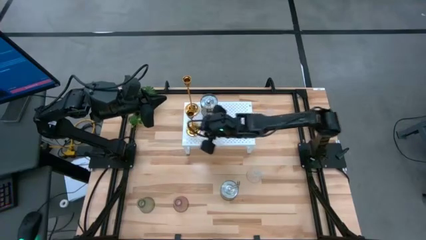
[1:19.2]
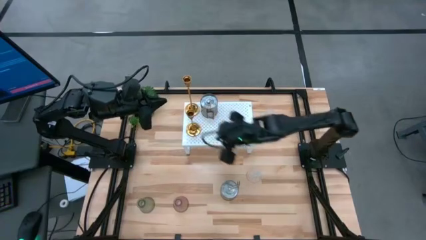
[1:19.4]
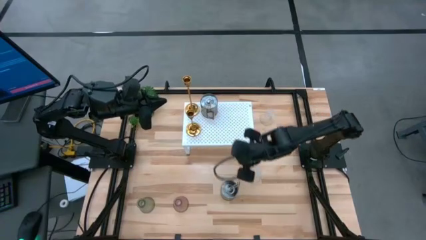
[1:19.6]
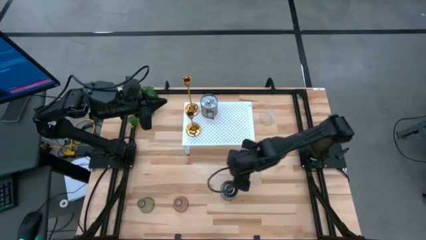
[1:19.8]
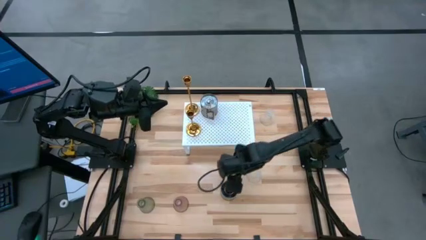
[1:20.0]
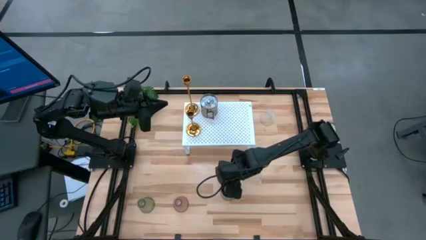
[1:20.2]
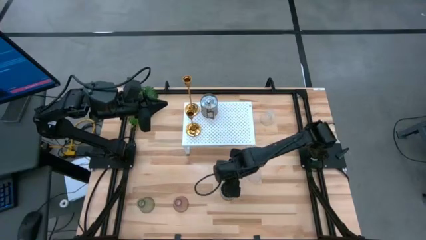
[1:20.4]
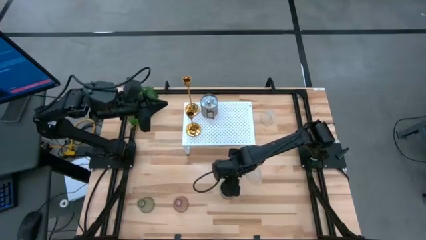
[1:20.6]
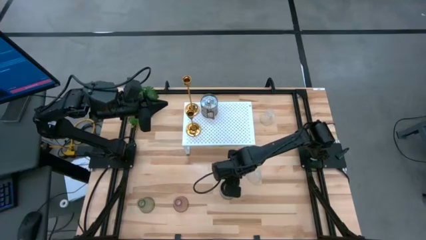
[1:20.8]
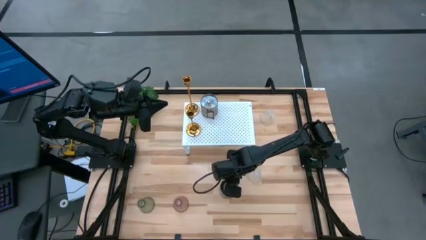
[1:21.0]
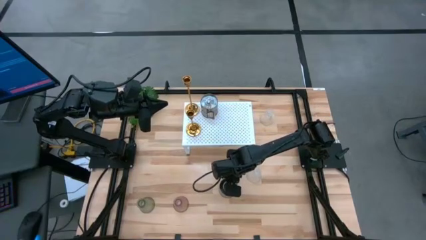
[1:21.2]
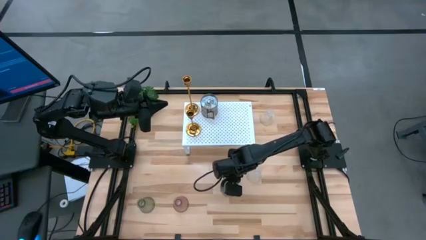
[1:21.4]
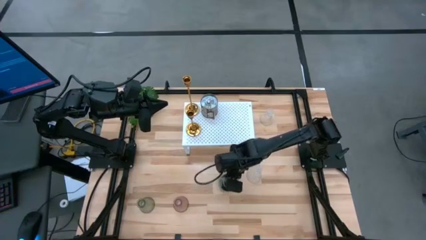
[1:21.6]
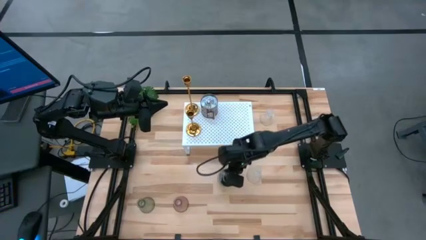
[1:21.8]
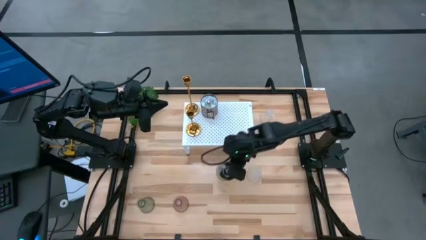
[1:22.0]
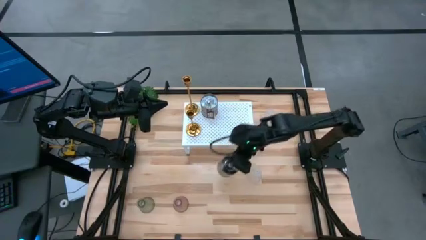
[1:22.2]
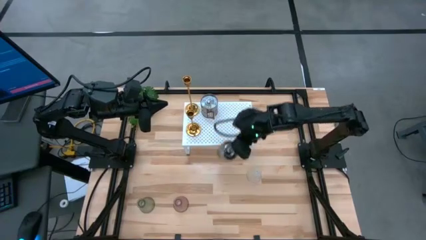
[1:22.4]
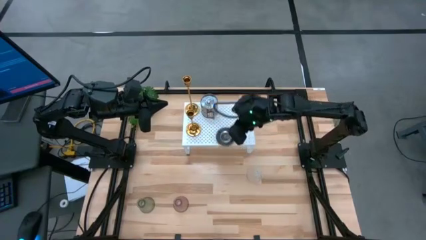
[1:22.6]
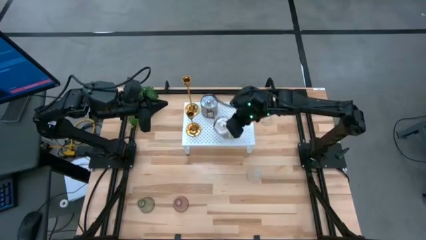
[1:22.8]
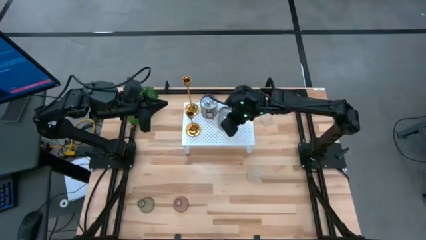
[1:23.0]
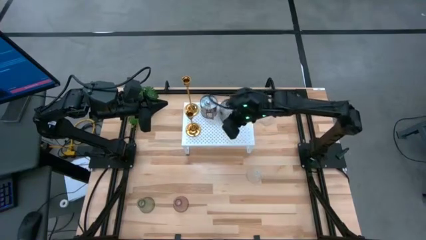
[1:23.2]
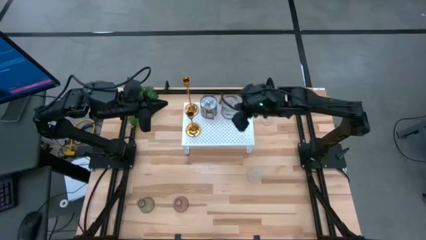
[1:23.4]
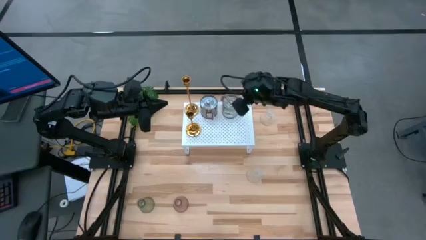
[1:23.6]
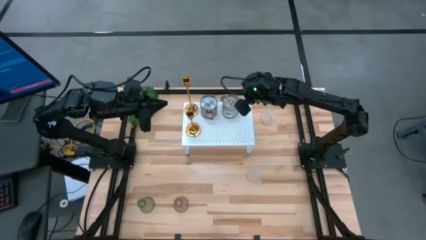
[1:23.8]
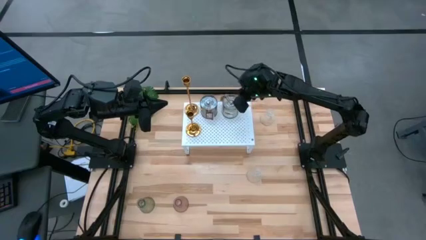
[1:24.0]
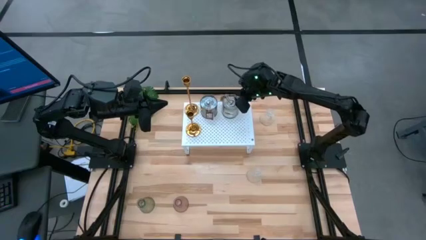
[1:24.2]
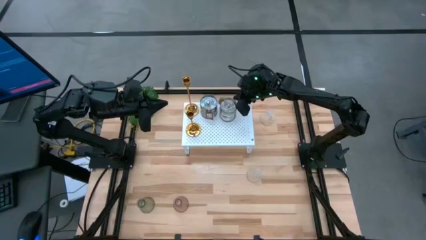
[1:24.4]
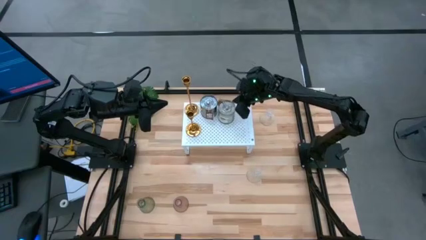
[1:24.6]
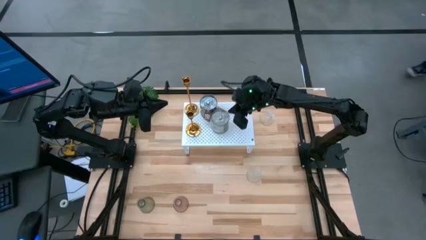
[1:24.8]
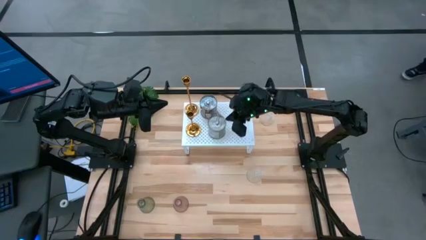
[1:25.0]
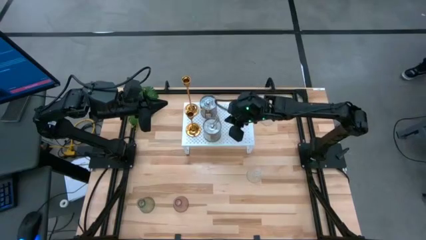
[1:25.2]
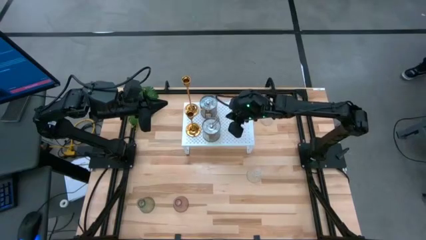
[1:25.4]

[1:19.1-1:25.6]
Task: Pick & Place candle stick holders
Put the silver scented candle on the shelf

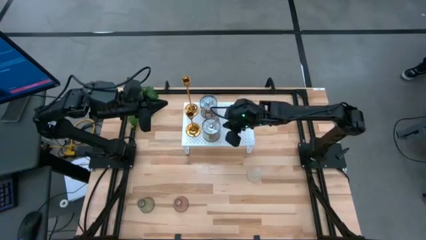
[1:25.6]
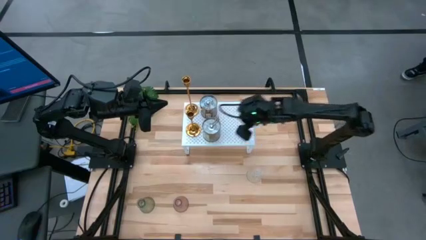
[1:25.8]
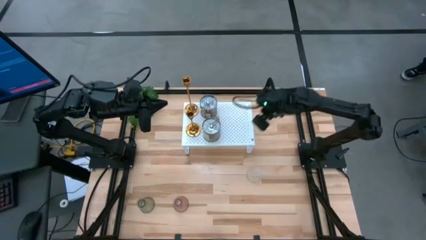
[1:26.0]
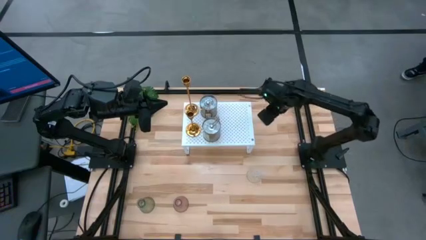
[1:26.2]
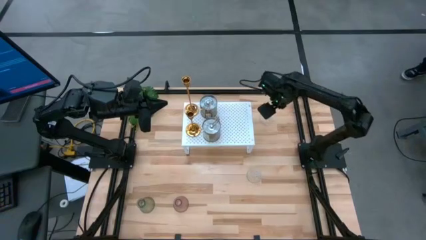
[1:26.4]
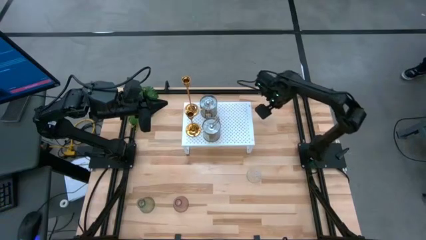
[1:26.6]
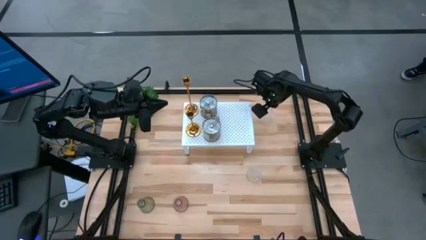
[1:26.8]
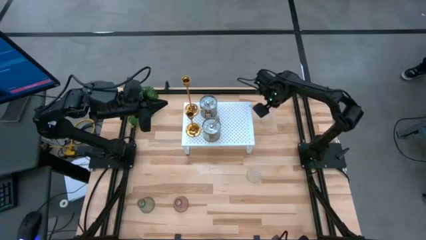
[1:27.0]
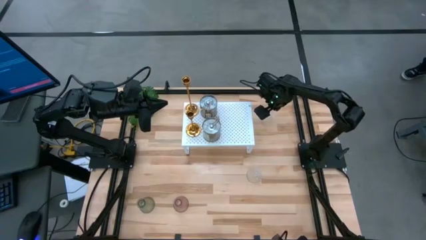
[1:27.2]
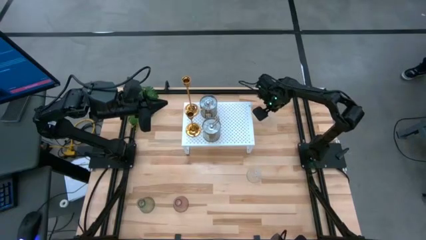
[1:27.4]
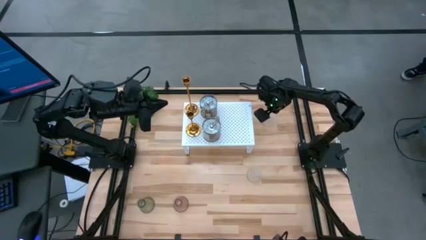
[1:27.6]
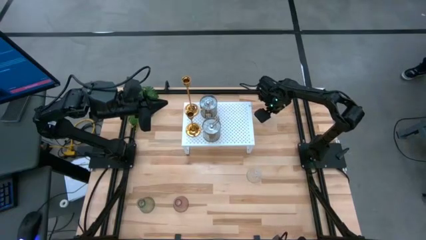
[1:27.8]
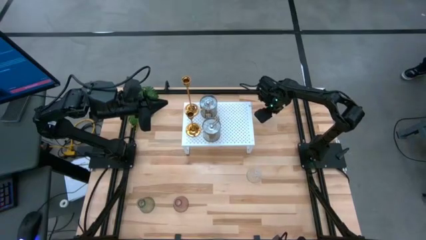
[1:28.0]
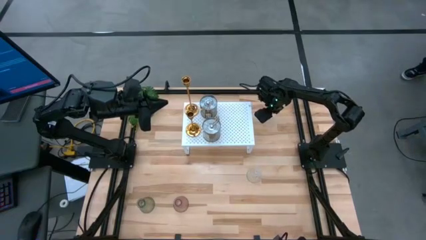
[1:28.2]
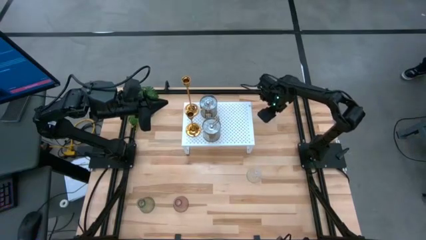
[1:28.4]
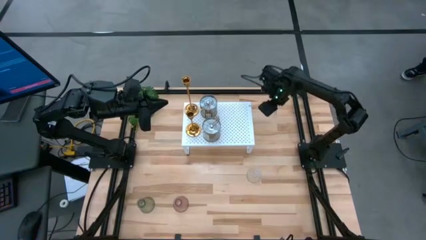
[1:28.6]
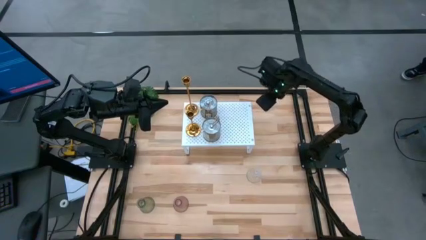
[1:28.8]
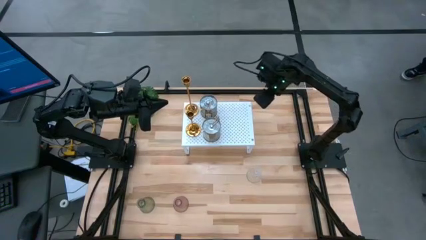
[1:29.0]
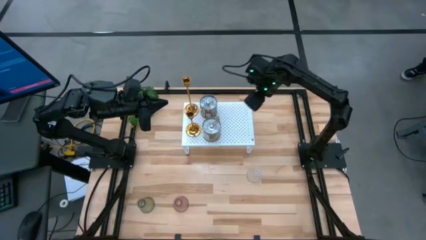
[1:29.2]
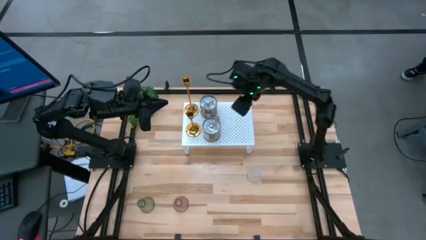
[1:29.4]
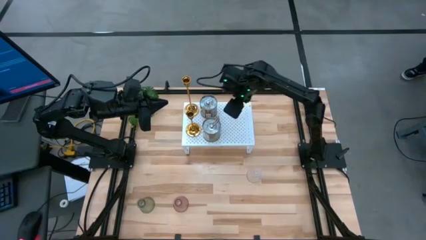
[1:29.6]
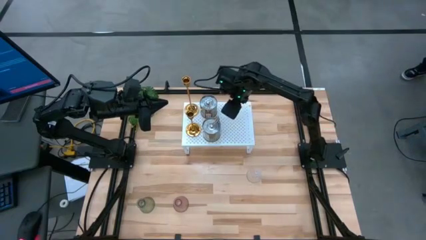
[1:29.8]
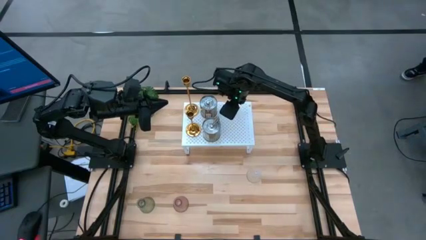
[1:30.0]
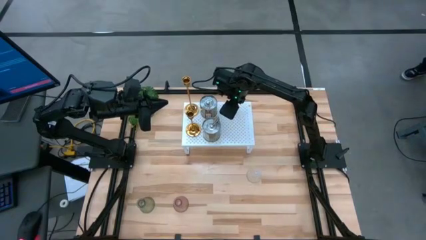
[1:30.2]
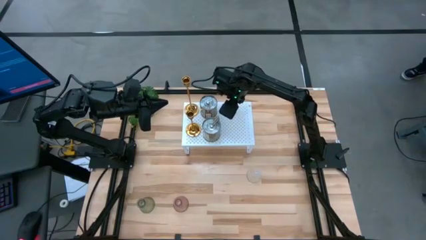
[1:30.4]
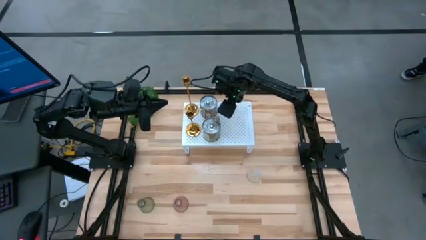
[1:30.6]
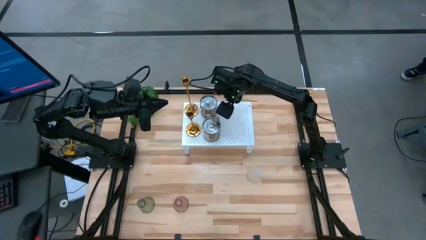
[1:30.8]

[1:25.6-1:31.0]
Put the top transparent glass candle holder on the shelf
